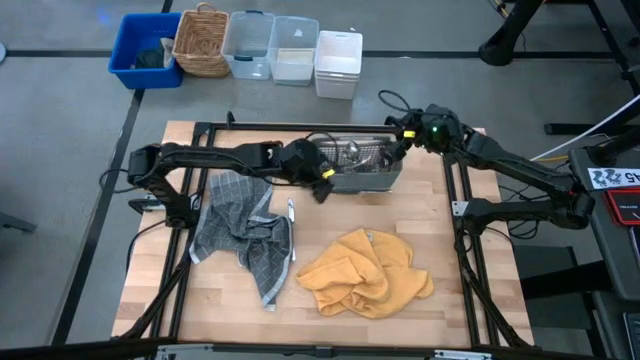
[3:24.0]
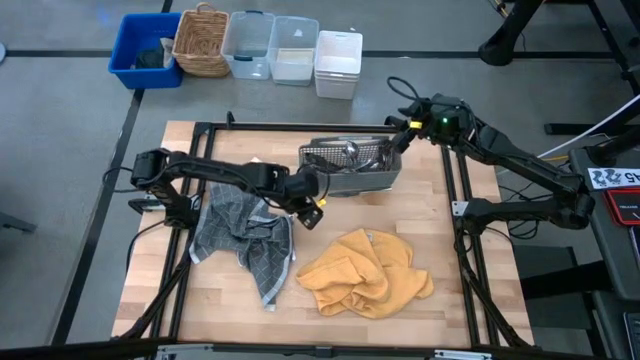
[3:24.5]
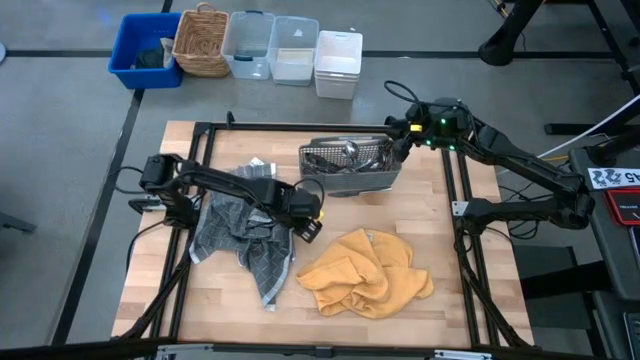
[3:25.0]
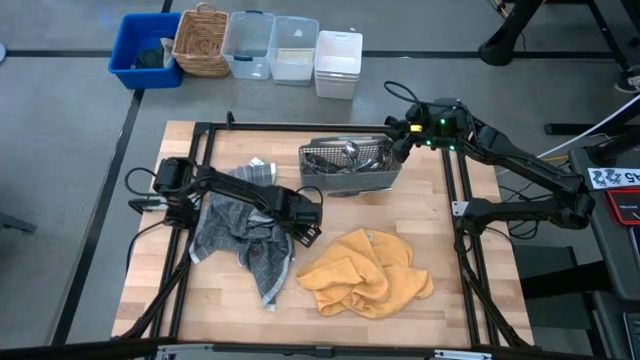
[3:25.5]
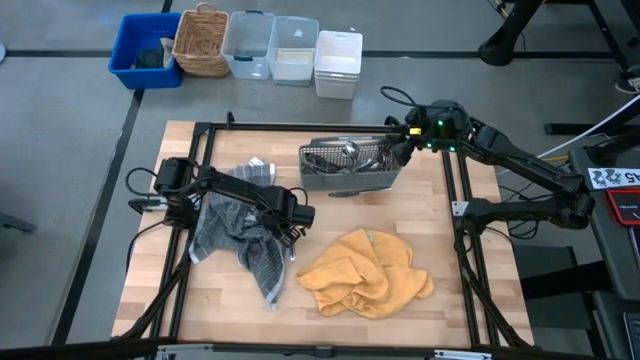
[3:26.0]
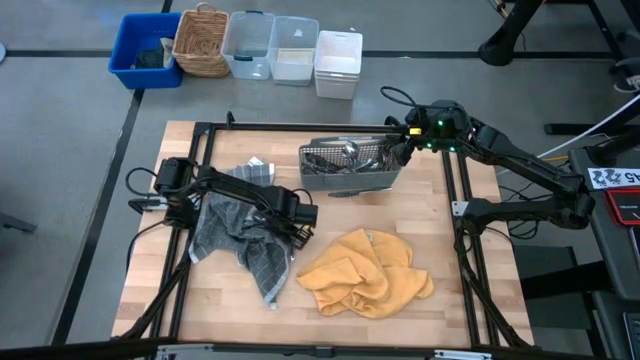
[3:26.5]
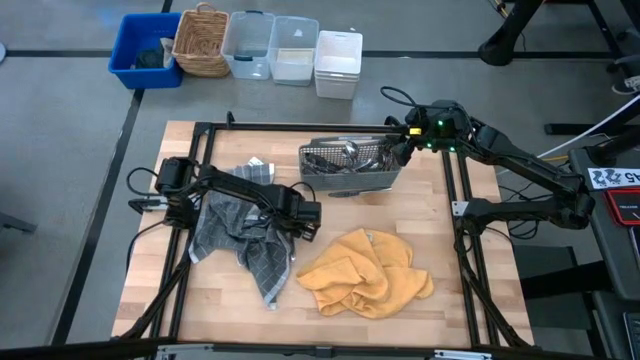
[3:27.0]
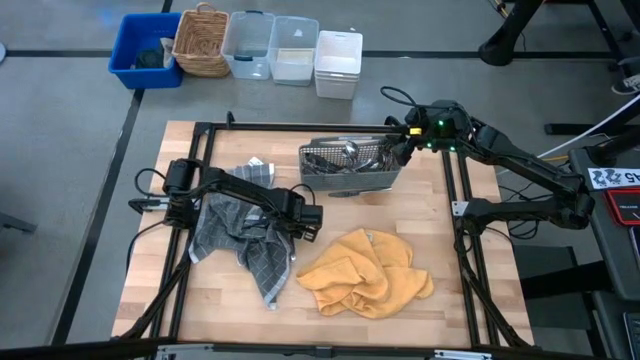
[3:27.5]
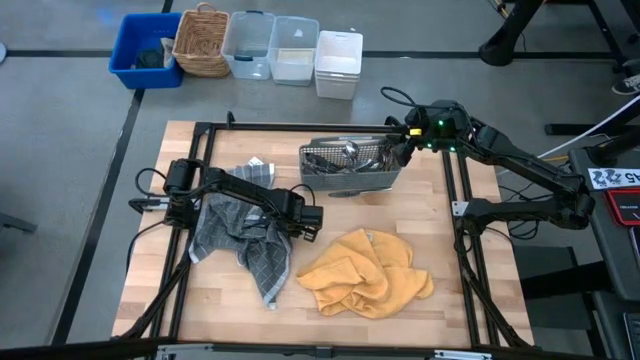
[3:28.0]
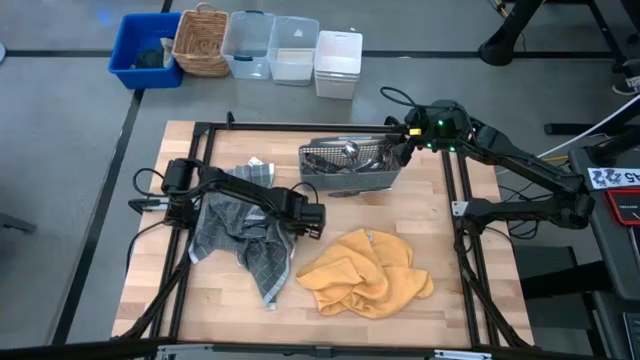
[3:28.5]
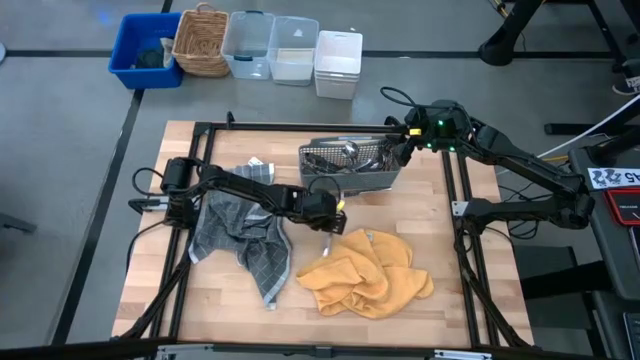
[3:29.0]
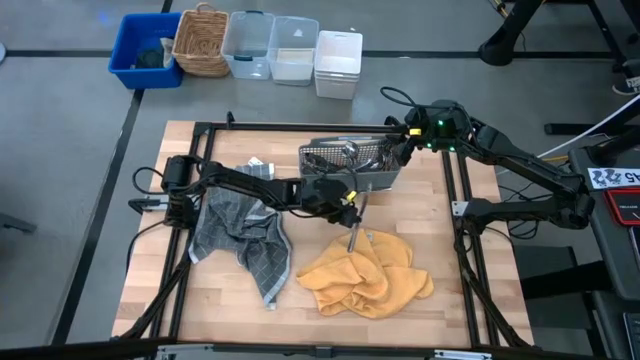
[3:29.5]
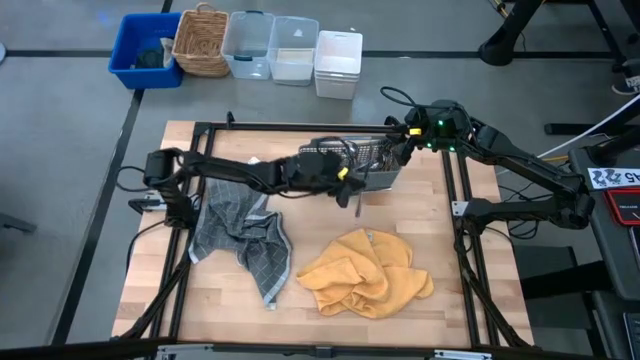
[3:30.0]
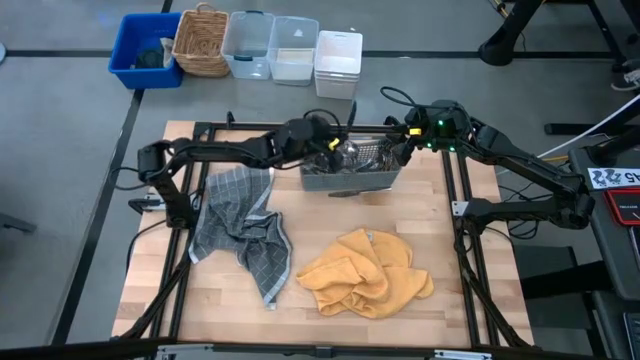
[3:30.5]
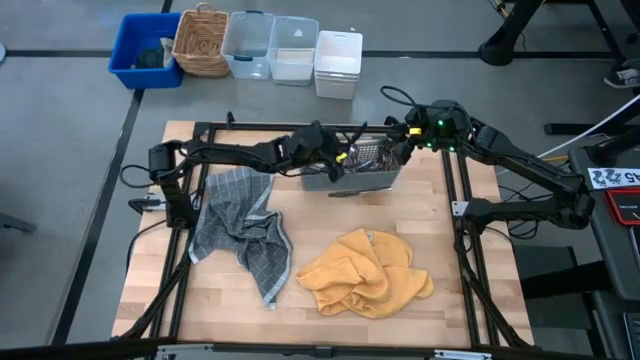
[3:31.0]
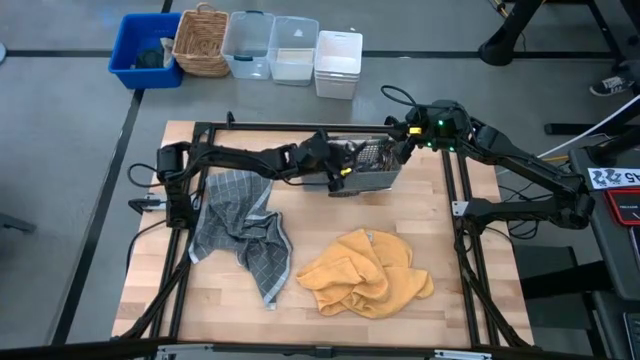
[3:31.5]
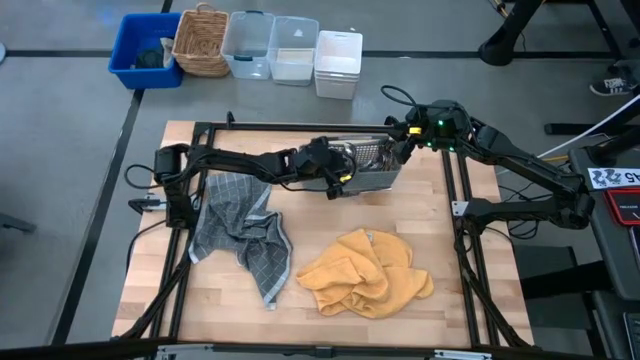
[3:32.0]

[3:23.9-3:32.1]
Task: Sort silverware
Put the silver knife into the gray utensil holder

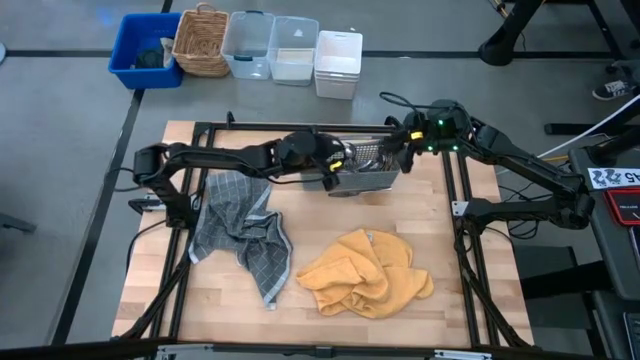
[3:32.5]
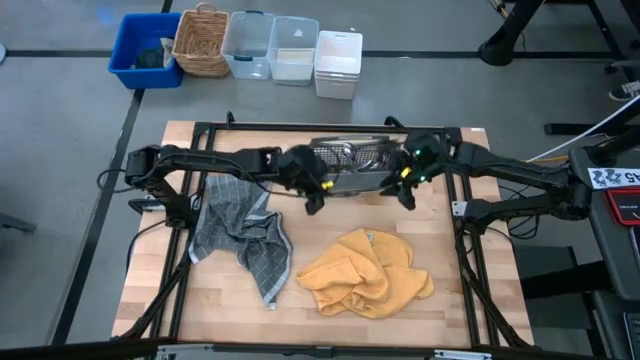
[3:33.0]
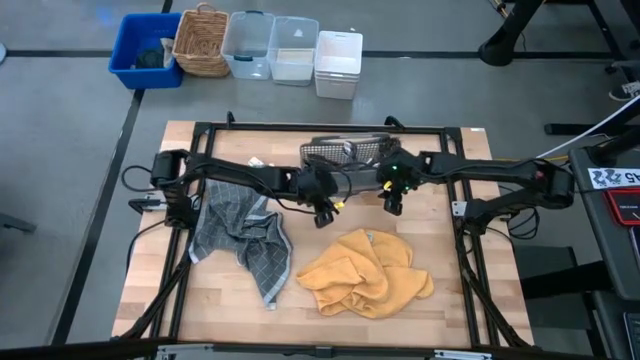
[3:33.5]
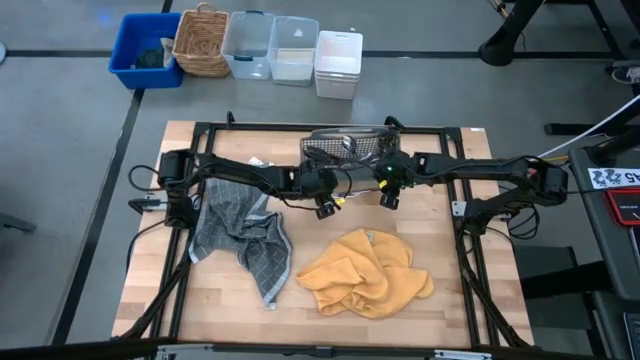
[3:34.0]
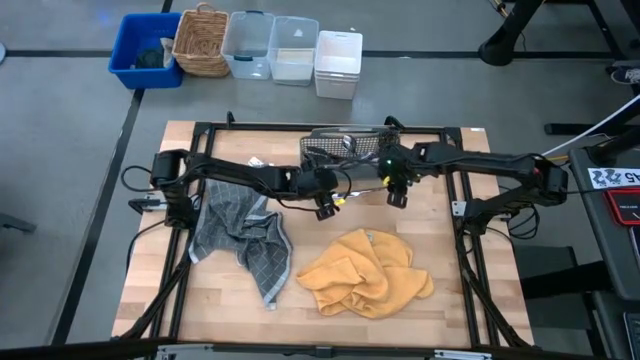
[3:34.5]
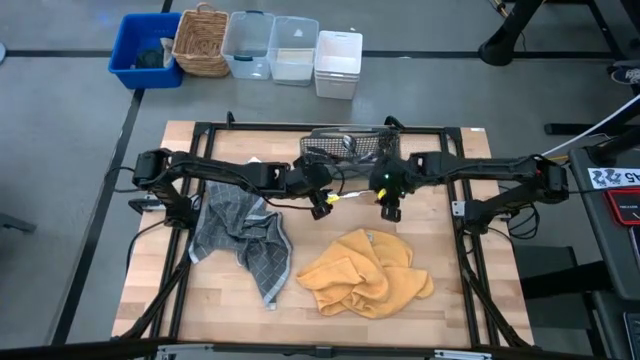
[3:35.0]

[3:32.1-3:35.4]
Adjust the gray utensil holder

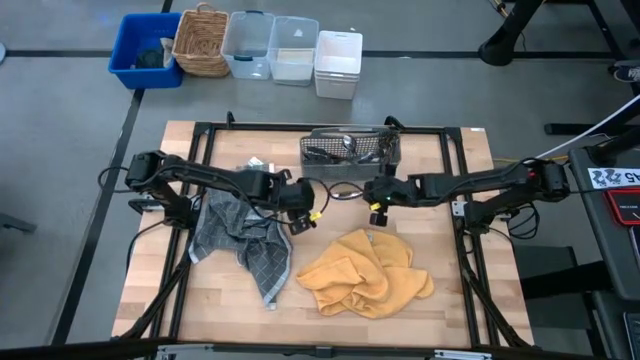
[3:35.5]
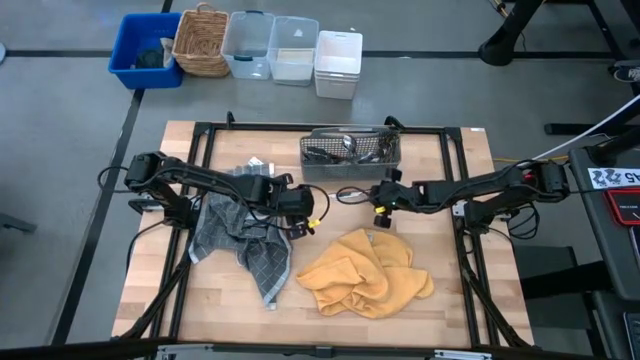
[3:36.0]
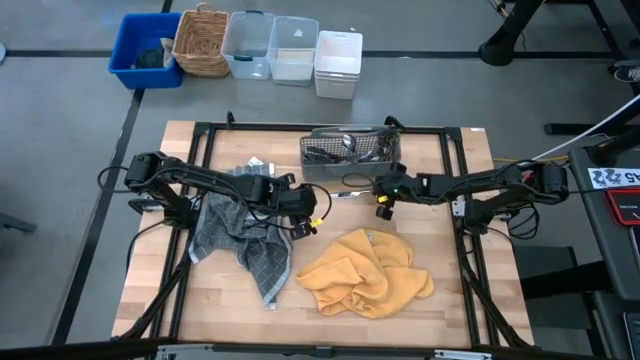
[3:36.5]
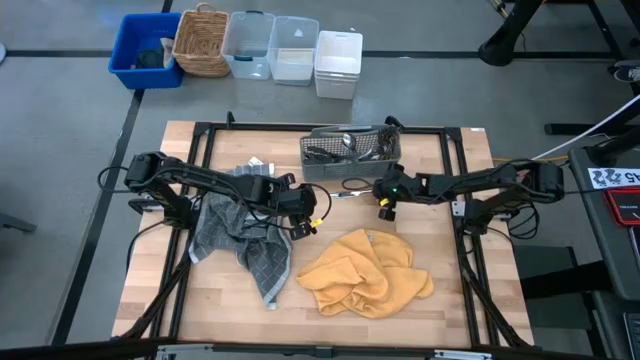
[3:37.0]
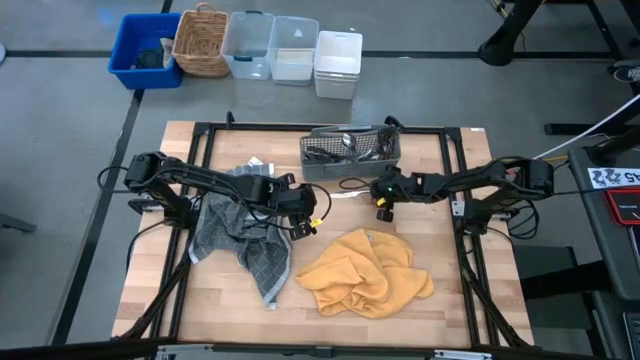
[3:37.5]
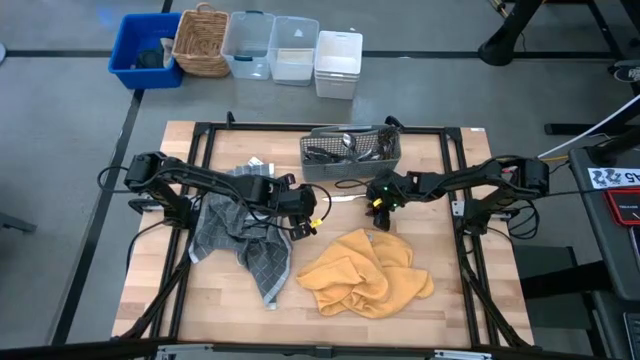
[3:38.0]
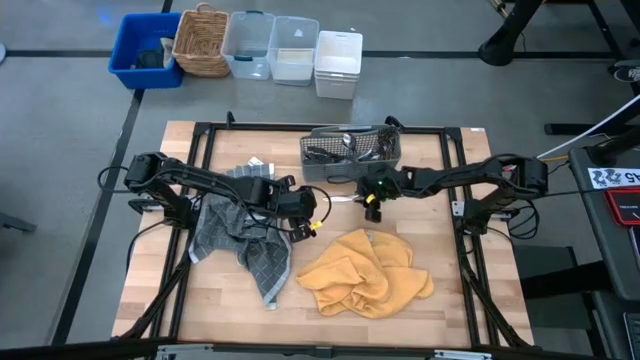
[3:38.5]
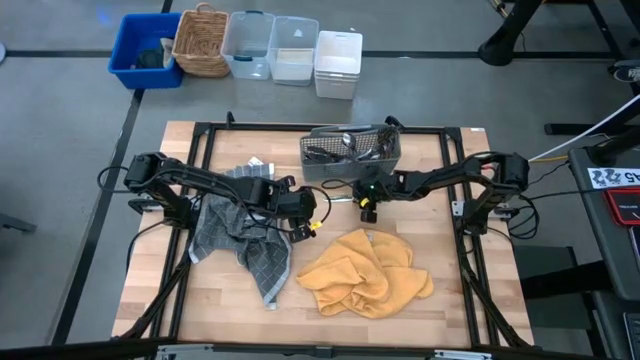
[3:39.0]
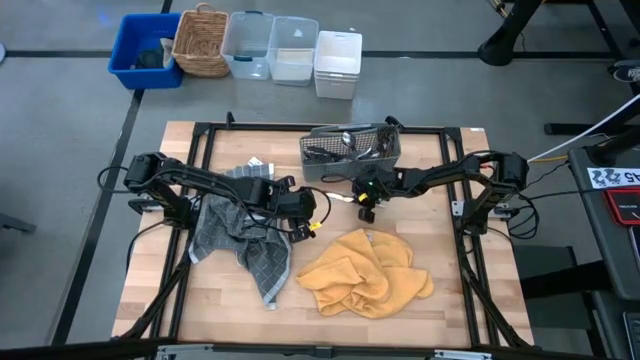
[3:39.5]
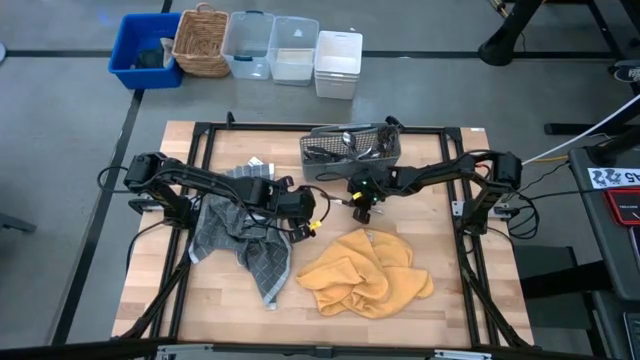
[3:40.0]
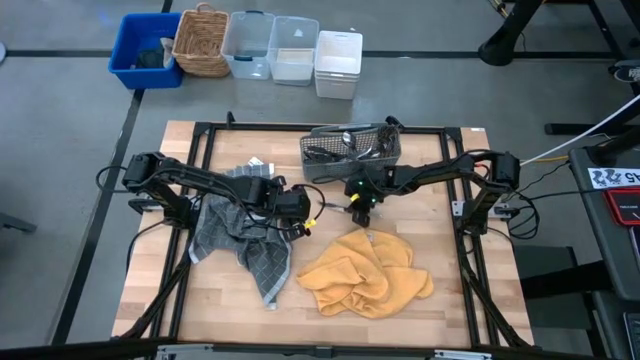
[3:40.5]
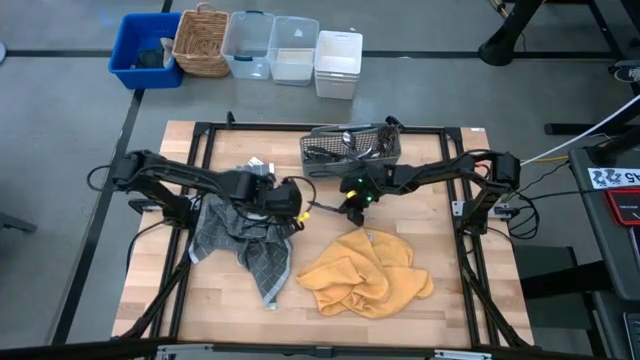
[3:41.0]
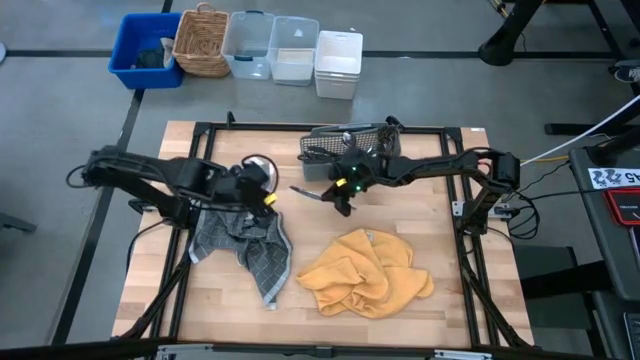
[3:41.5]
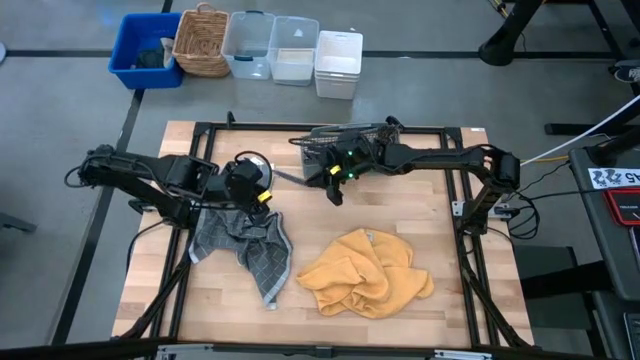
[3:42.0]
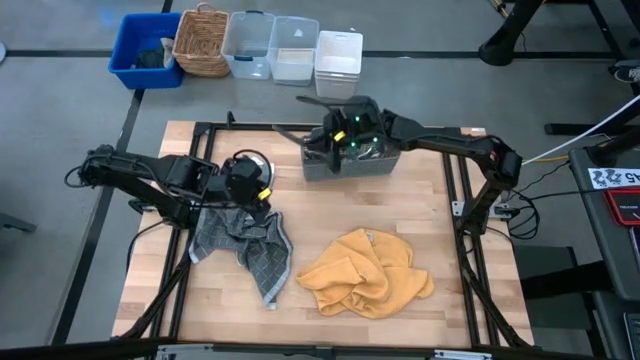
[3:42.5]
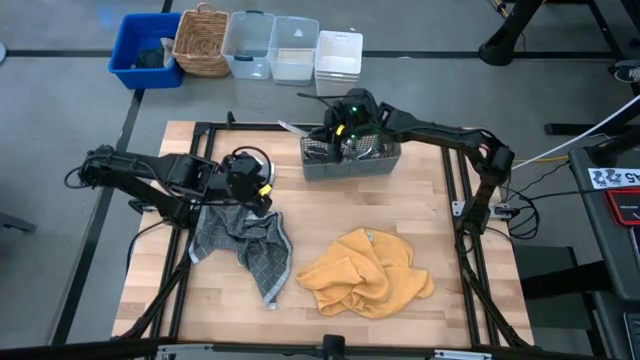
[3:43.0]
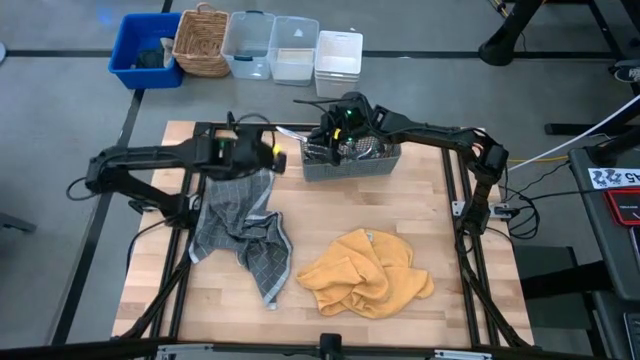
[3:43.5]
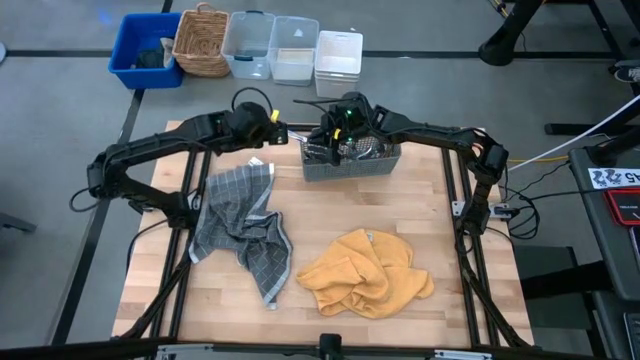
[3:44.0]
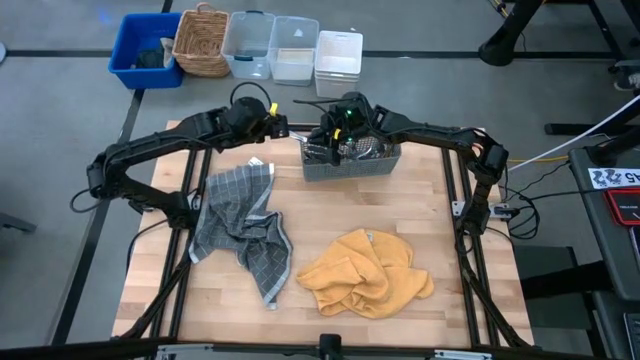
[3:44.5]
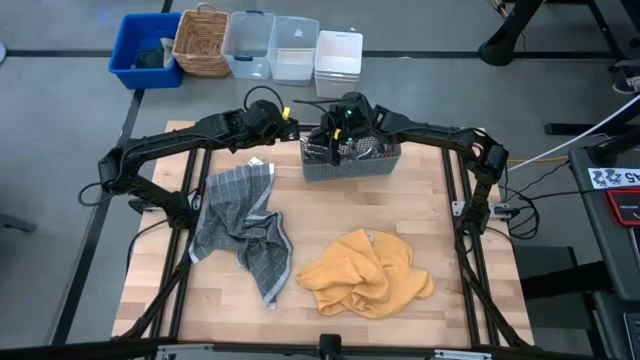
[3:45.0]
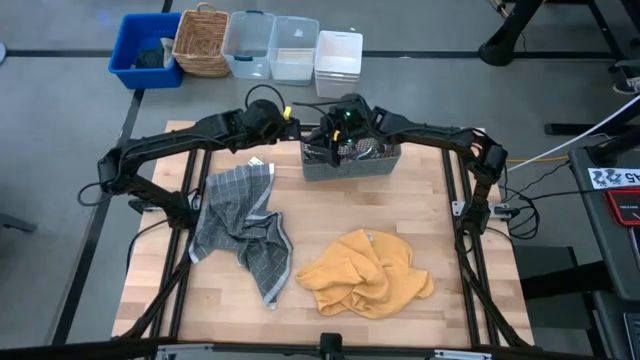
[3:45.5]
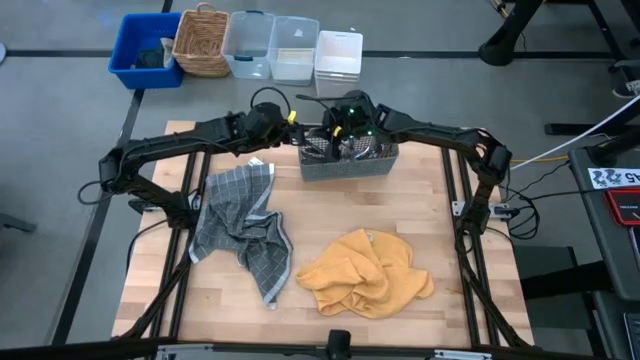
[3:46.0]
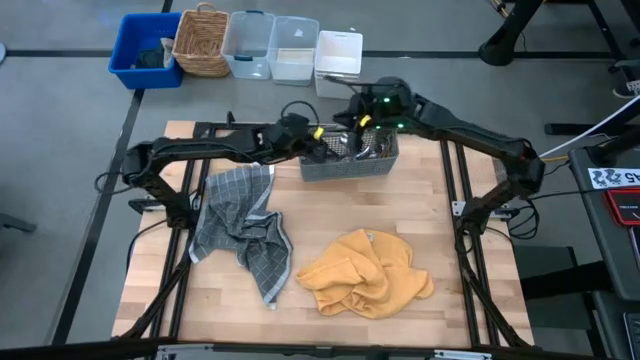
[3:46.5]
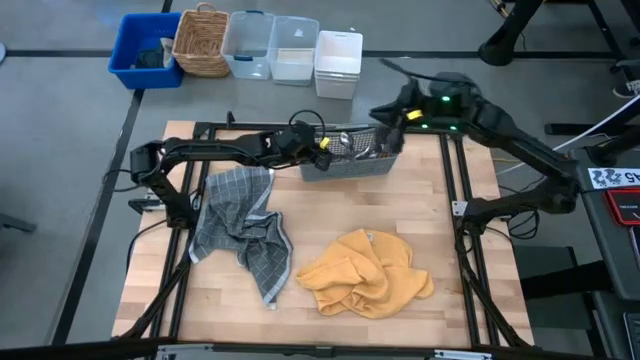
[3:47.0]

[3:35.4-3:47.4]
Put the silver knife into the gray utensil holder
